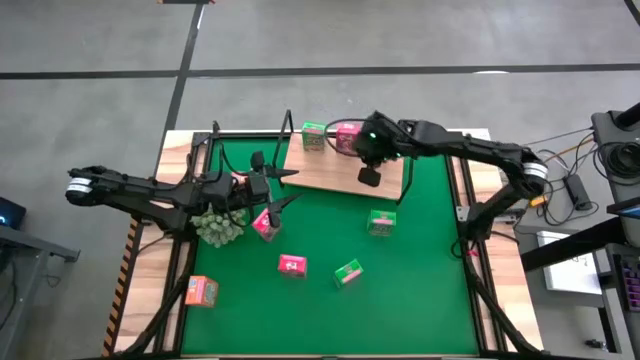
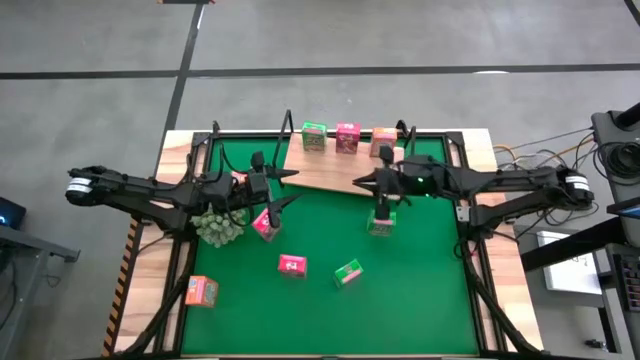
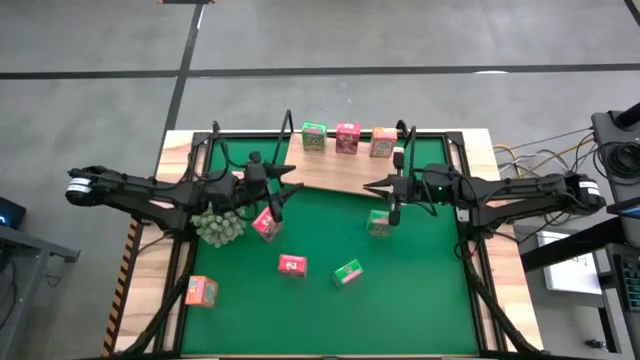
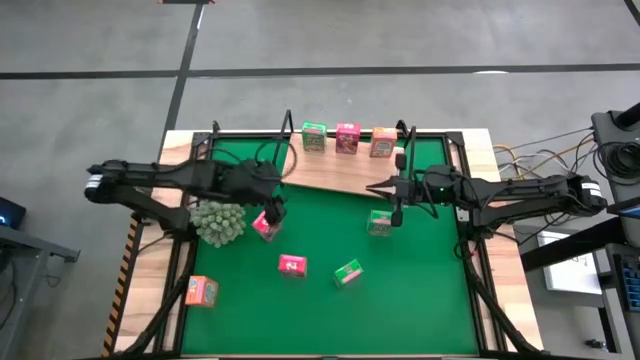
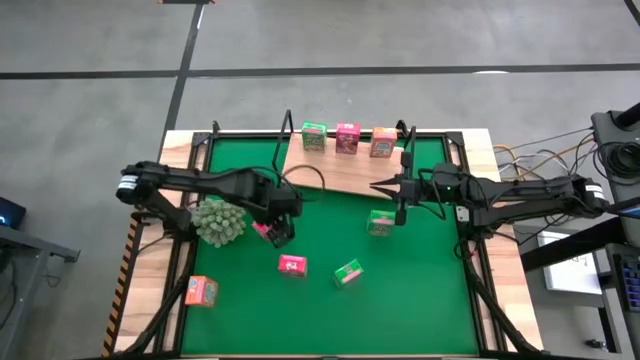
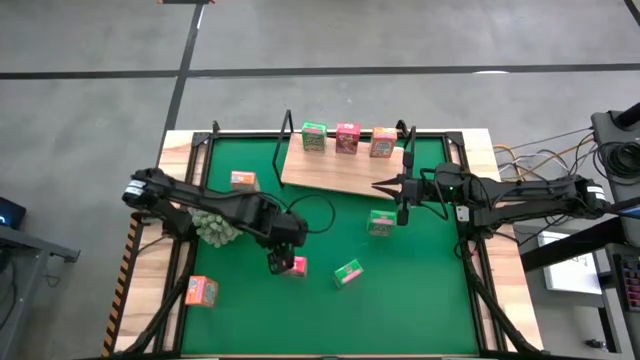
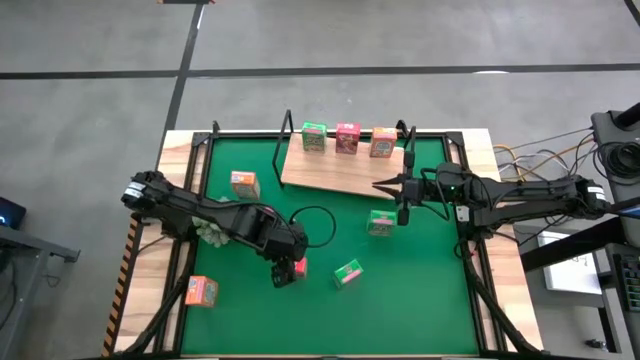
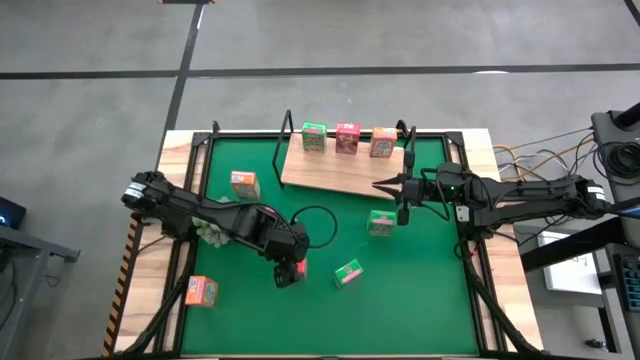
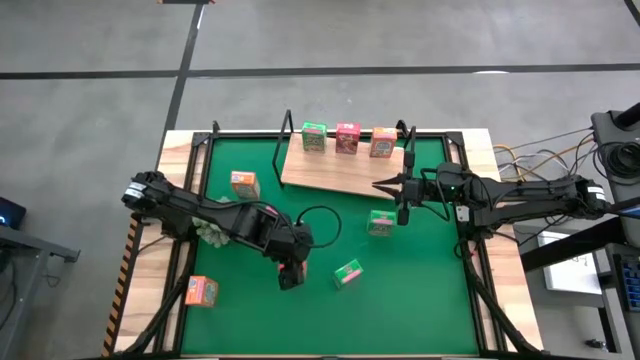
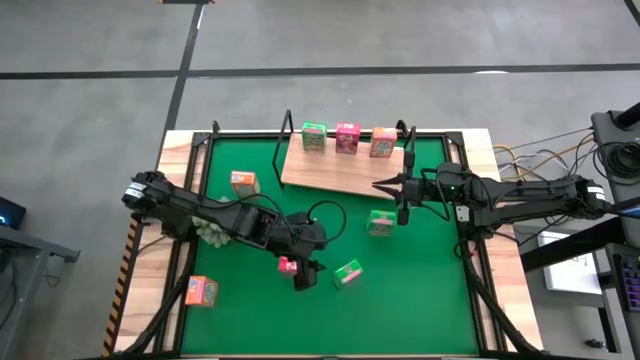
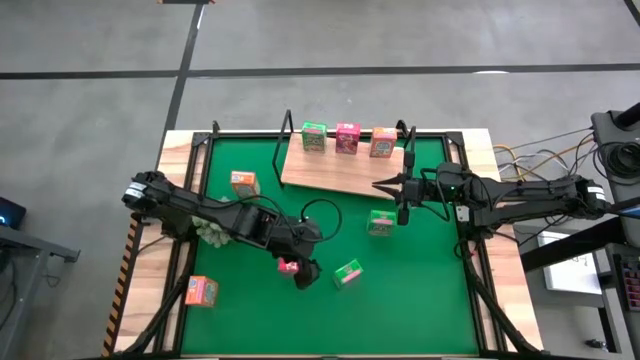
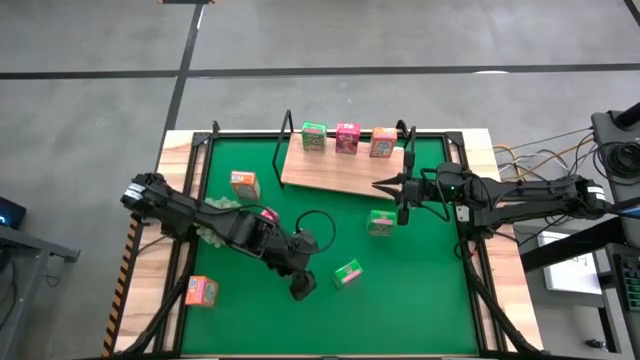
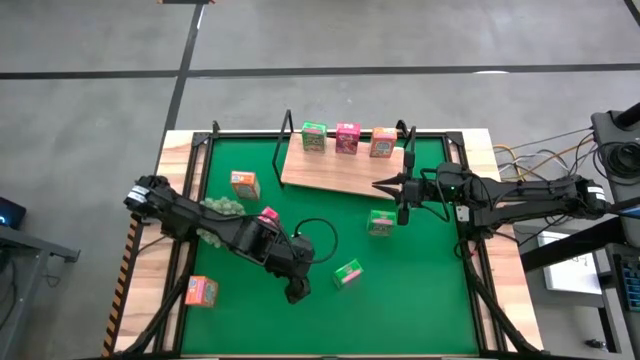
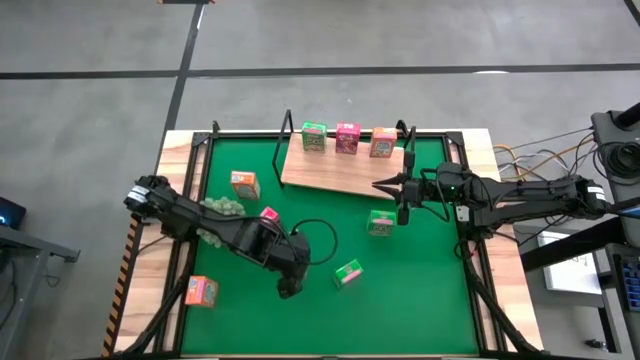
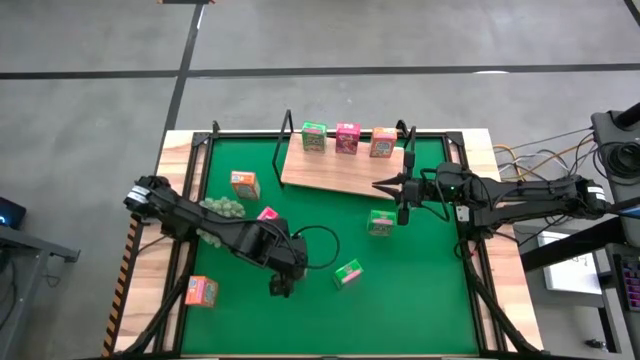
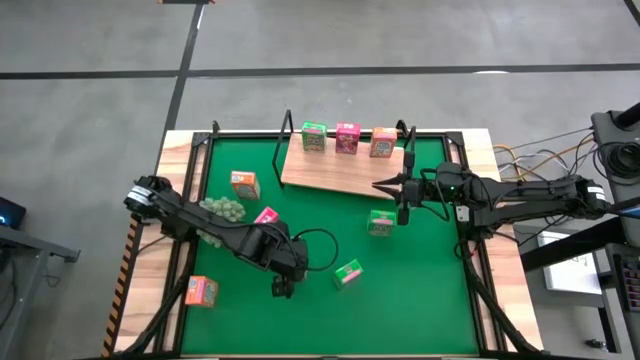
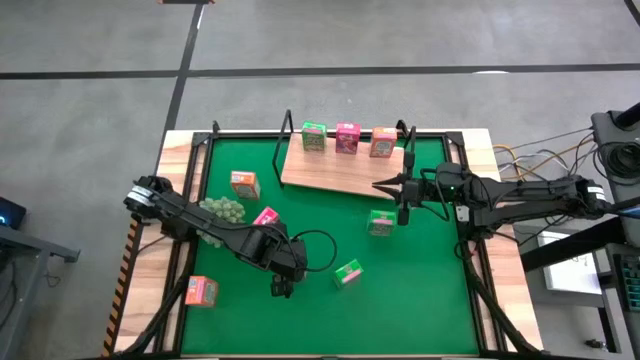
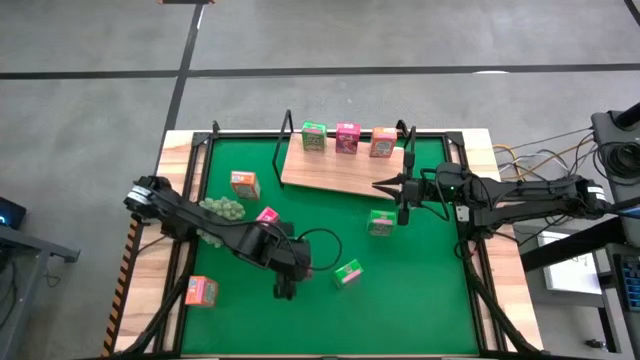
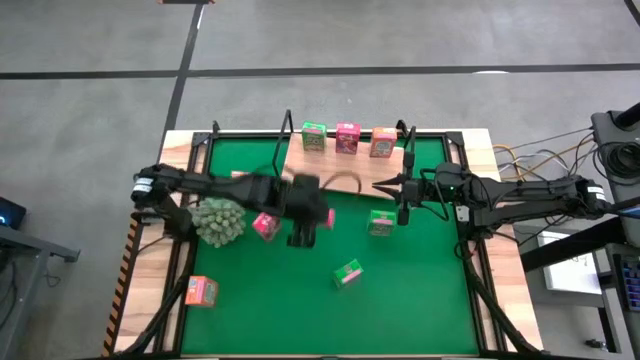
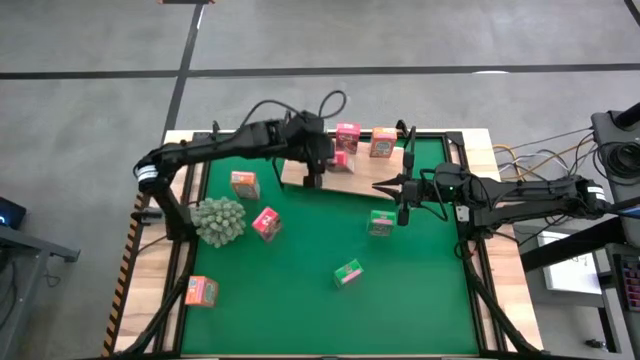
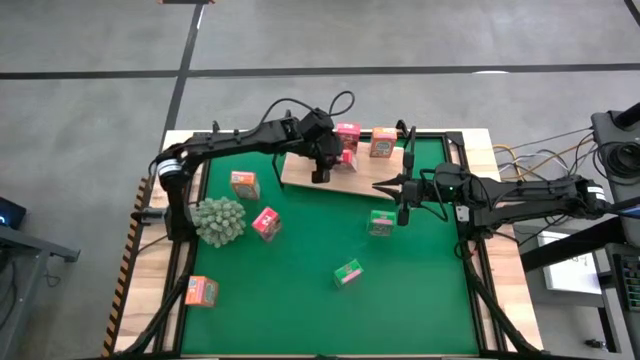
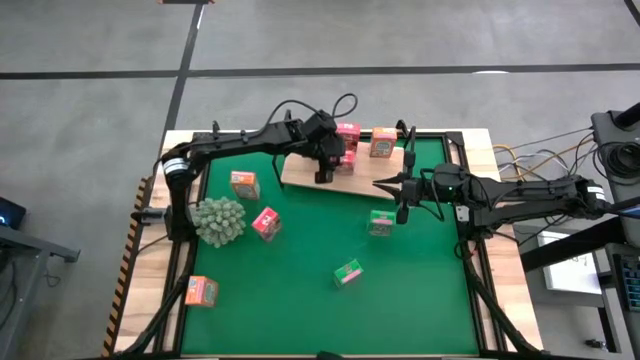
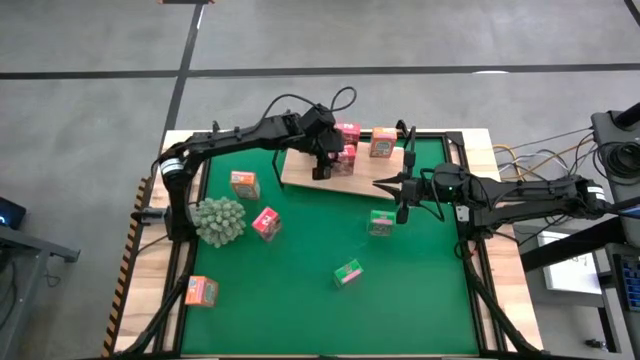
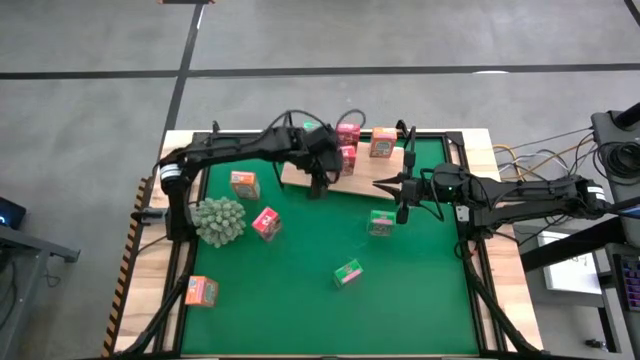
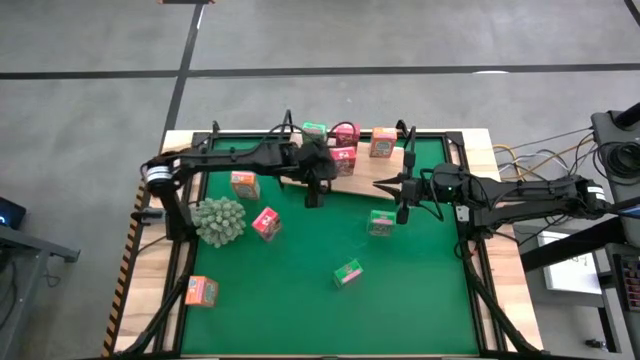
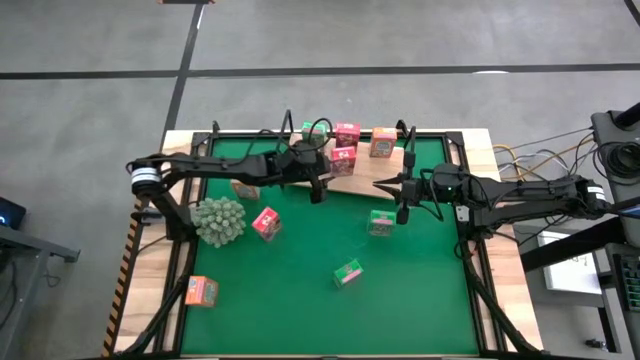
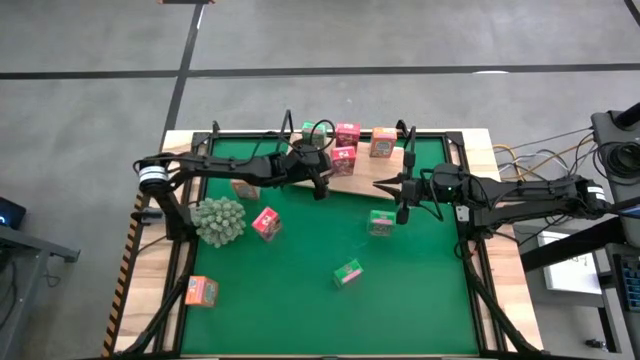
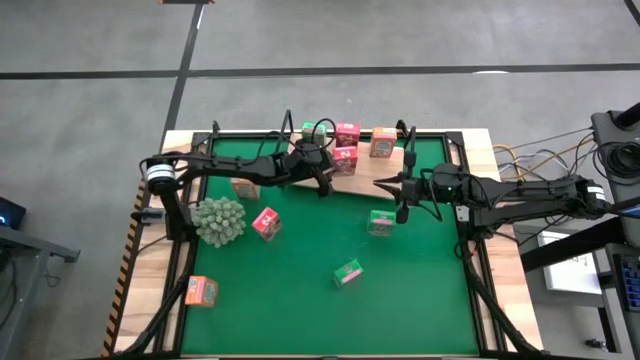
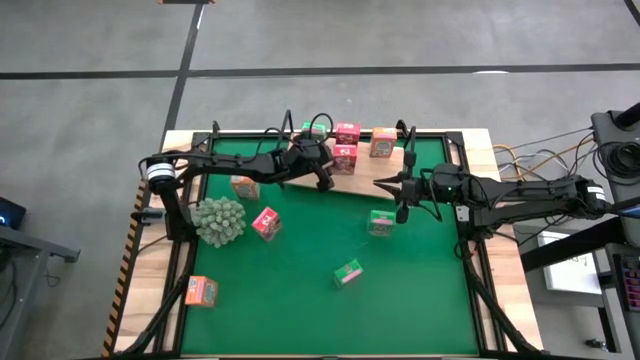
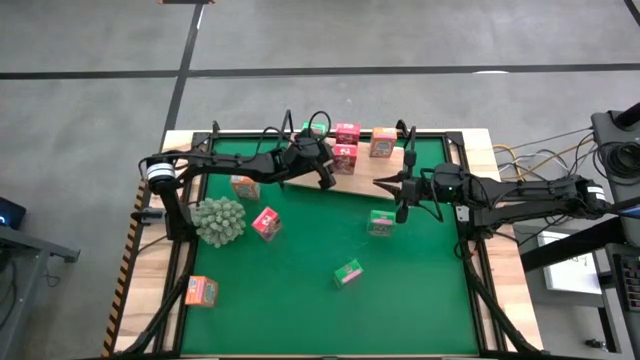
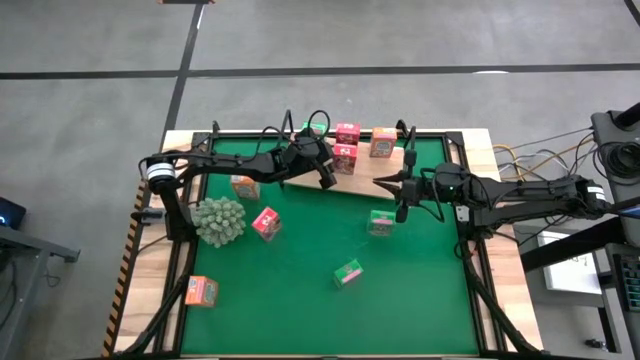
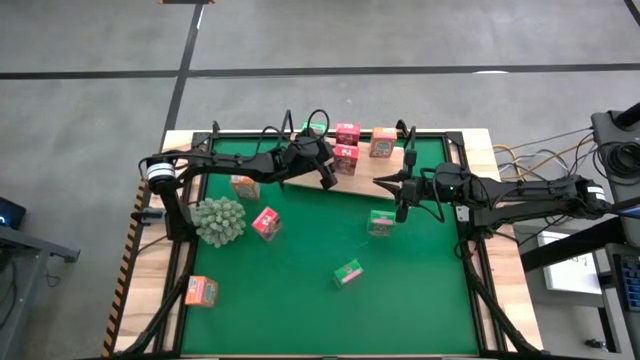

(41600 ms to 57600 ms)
Task: Stack cereal on shelf
Put the bottom right red cereal box on the shelf aligned with the other red cereal box

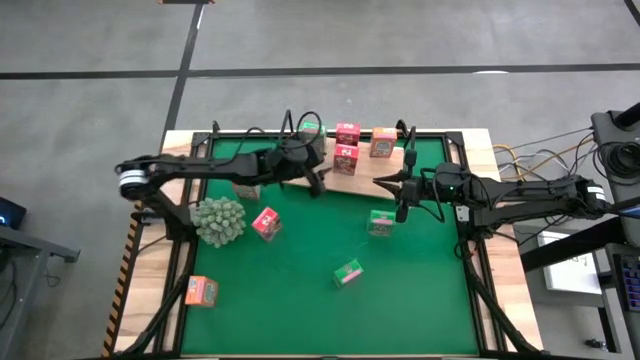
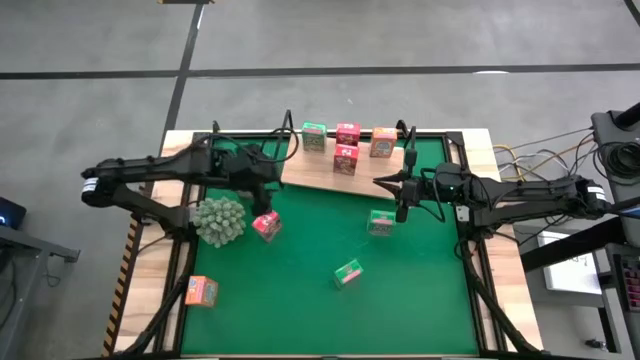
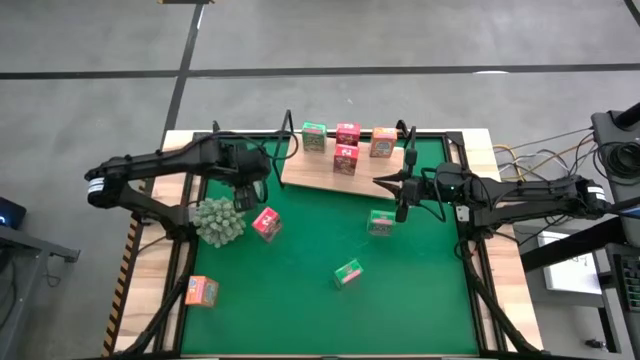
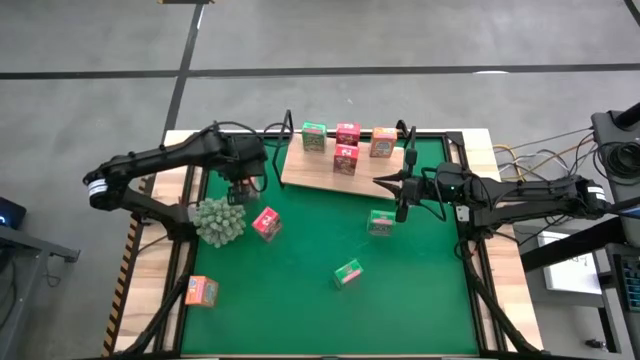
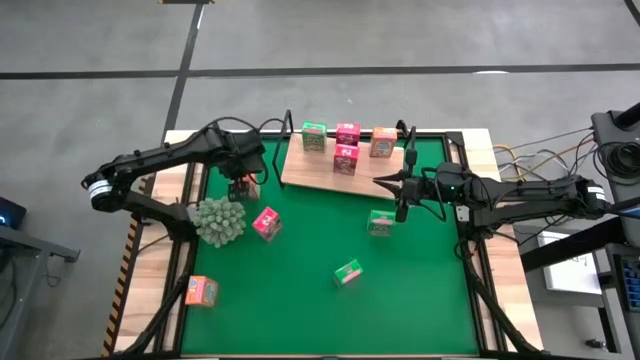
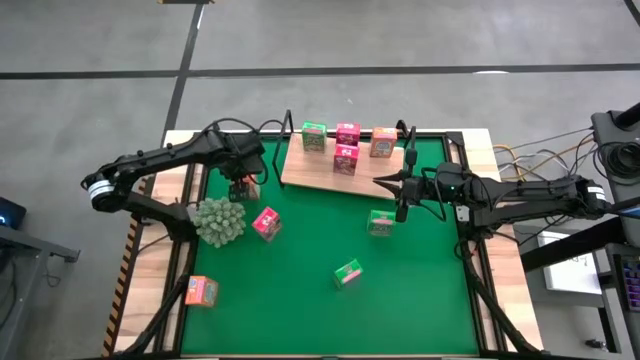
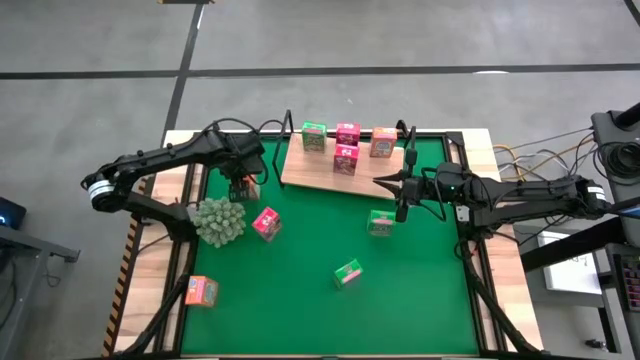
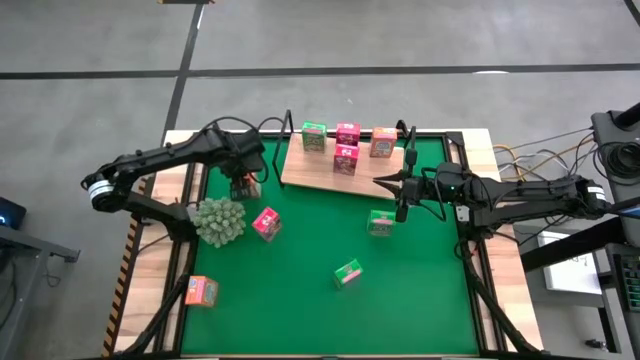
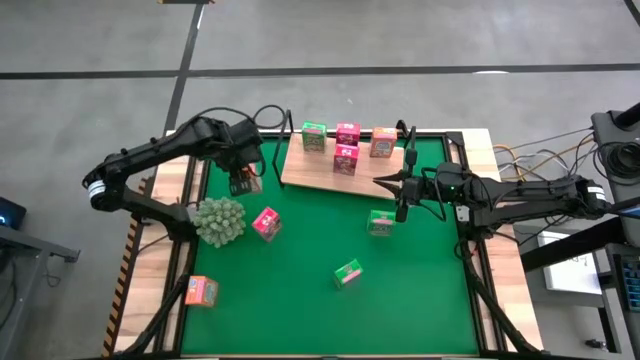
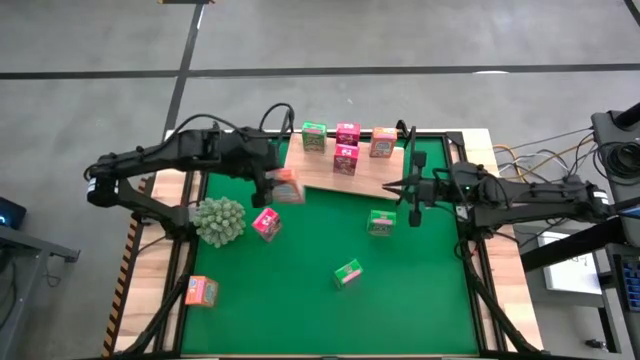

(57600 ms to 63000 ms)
Put the top orange cereal box on the shelf aligned with the other orange cereal box
